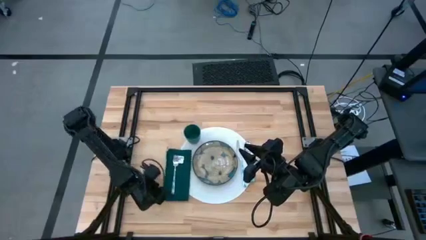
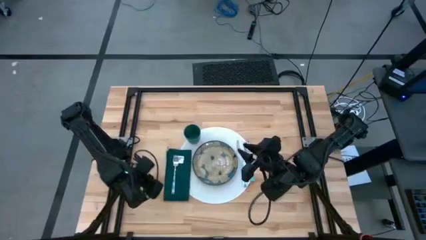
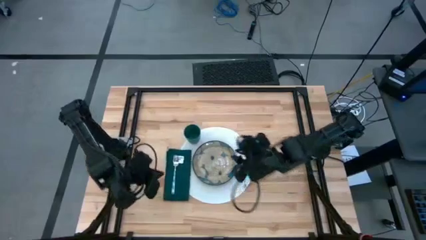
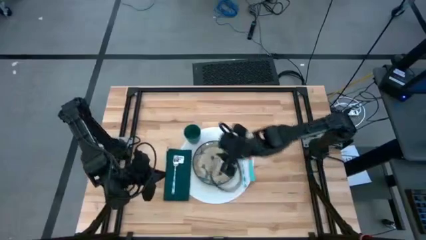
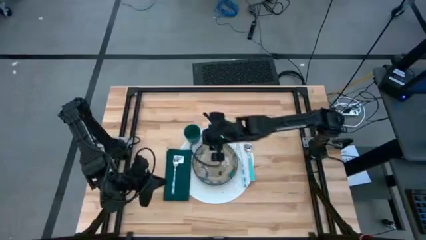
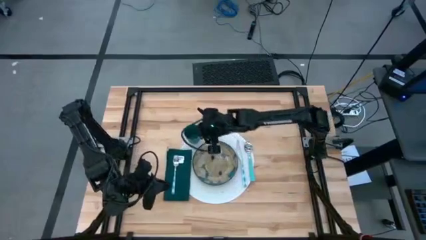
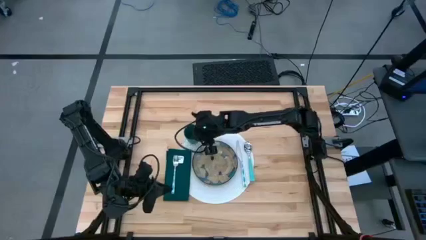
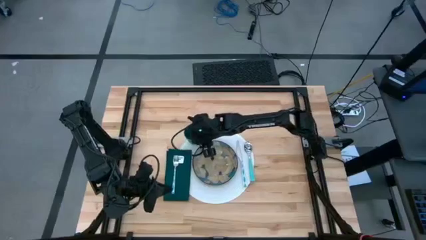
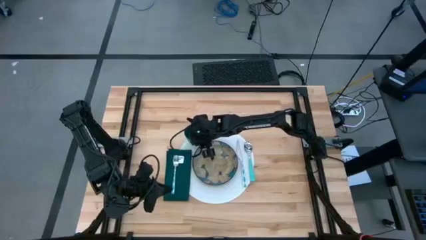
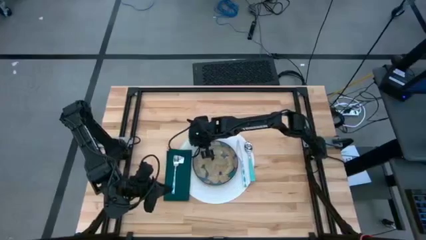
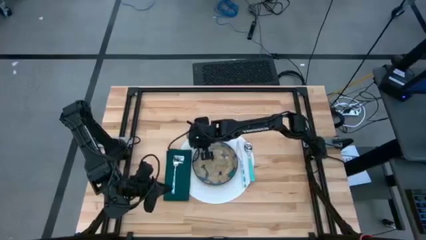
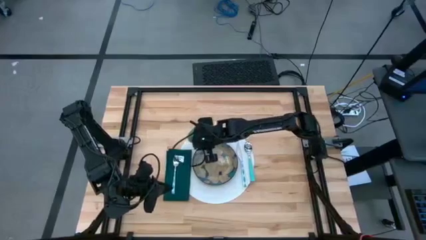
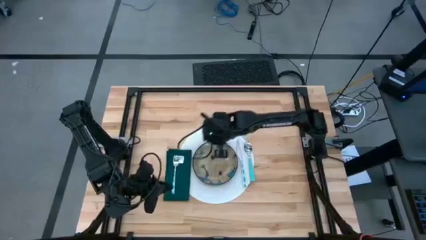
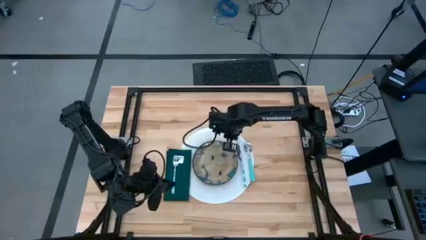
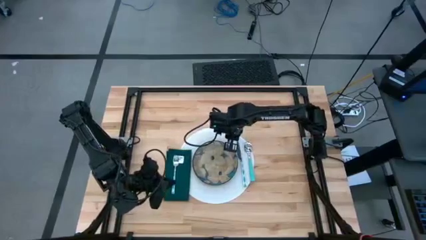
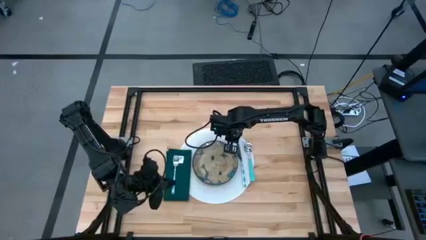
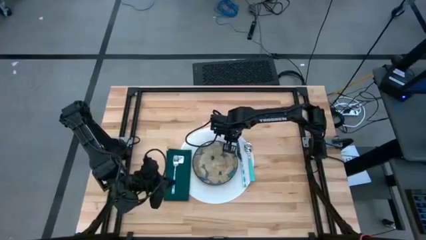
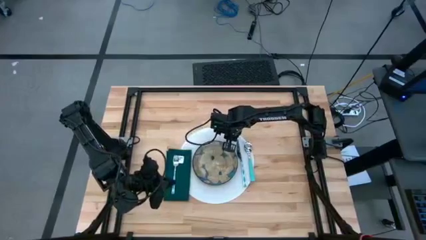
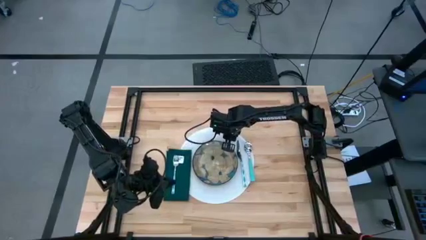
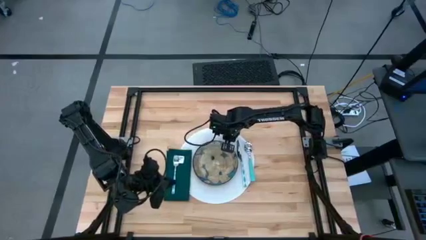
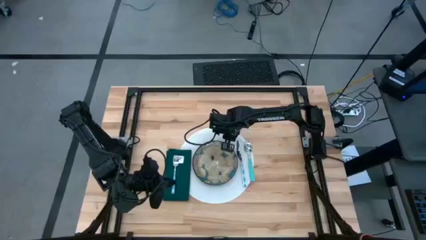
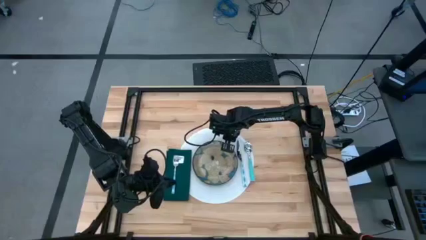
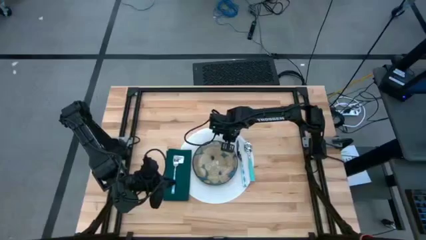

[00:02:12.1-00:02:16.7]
Task: Set table place
Move the dark green cup on the top right of the white table mat

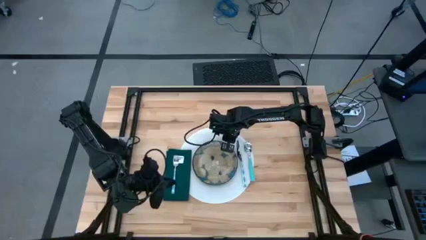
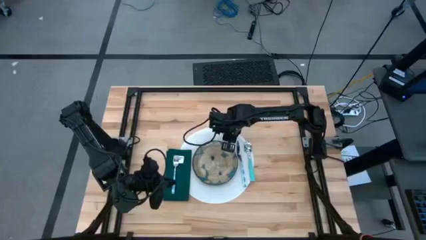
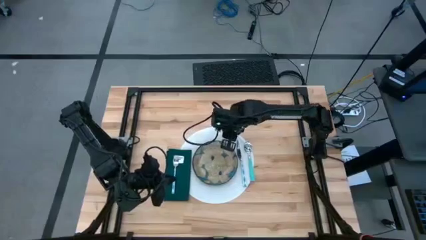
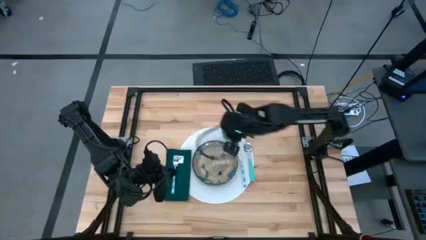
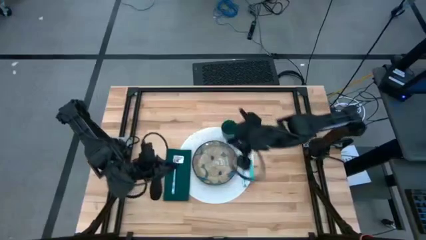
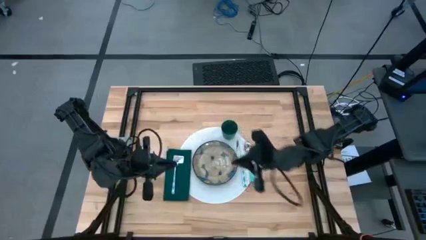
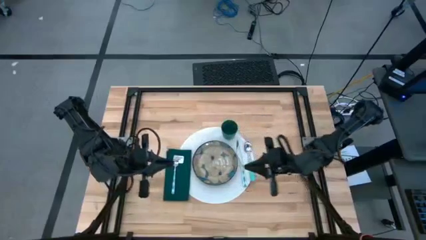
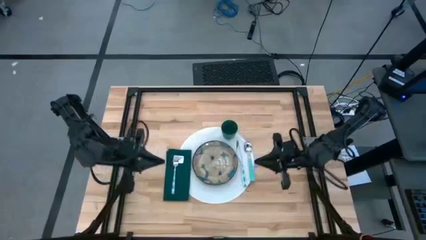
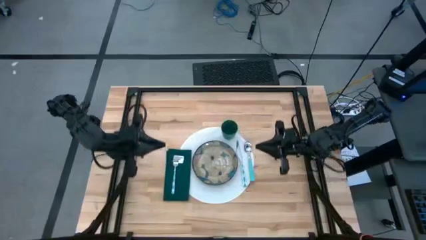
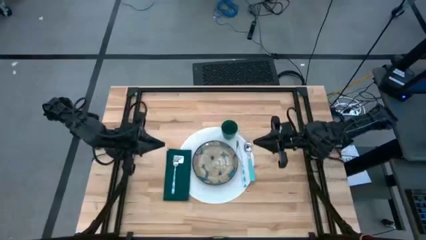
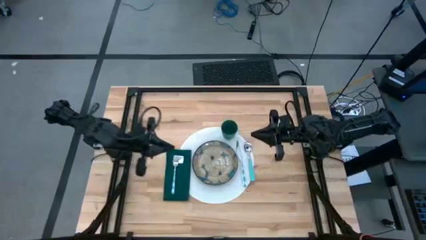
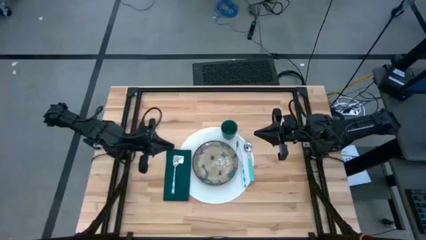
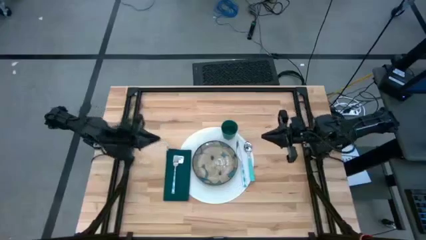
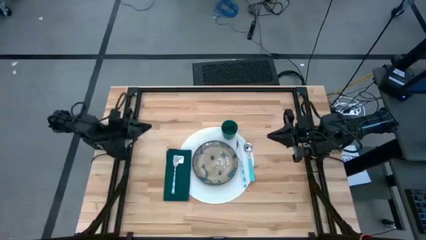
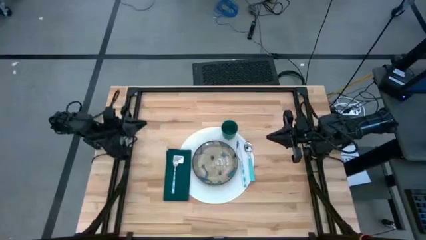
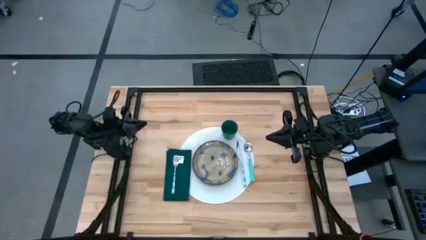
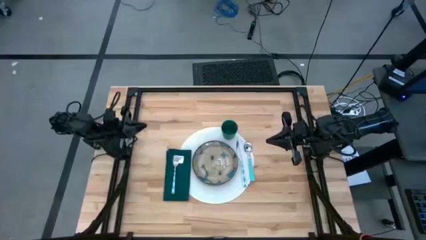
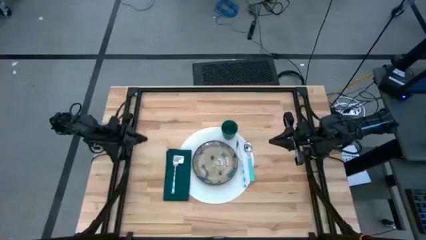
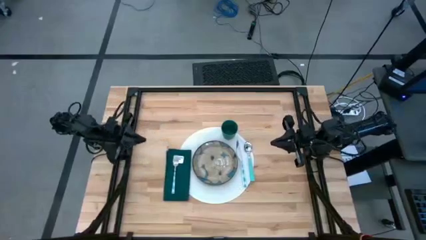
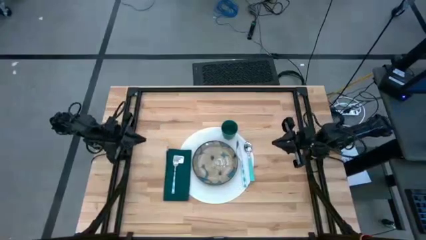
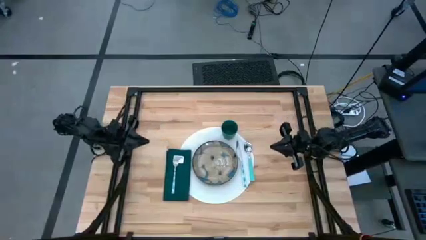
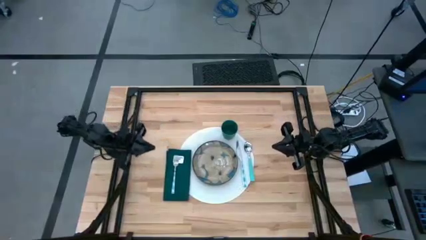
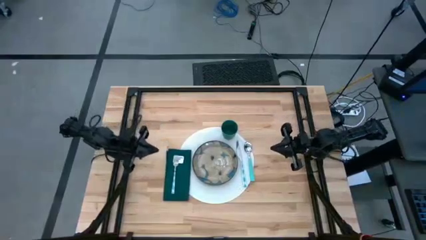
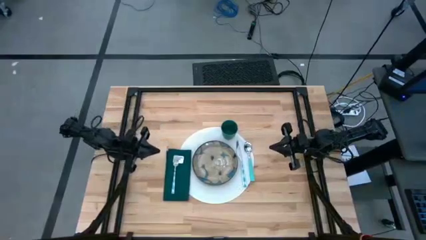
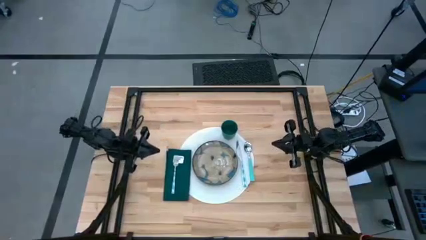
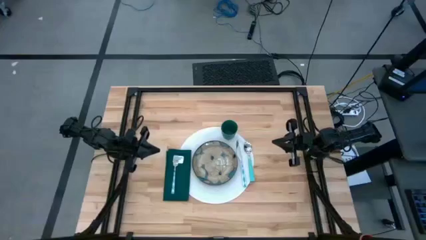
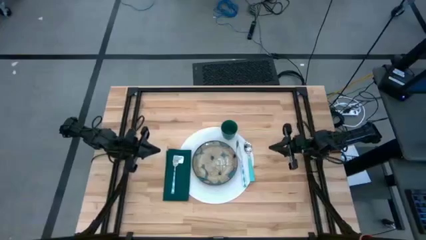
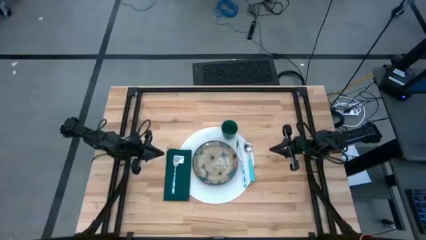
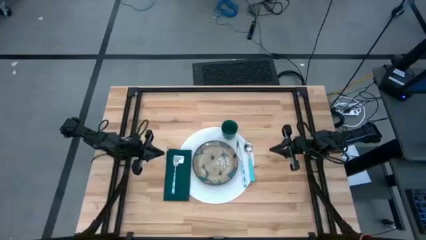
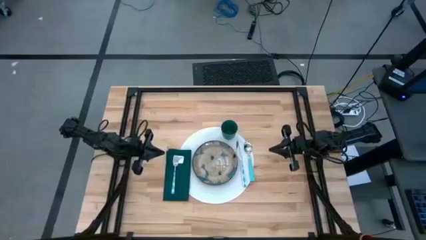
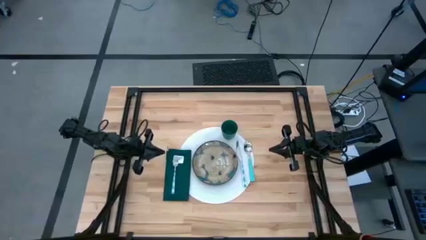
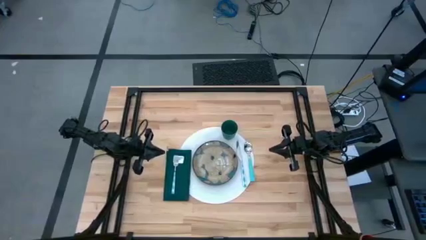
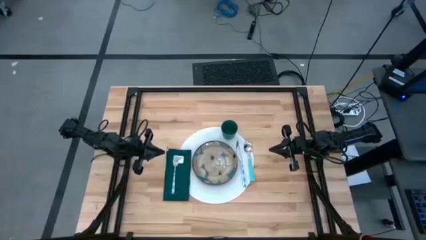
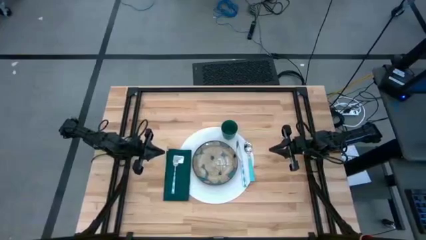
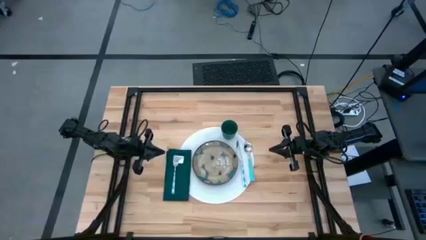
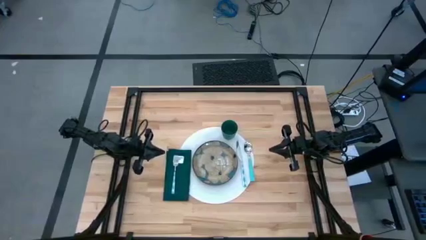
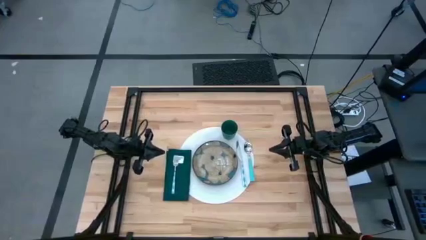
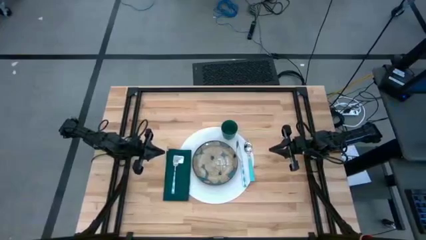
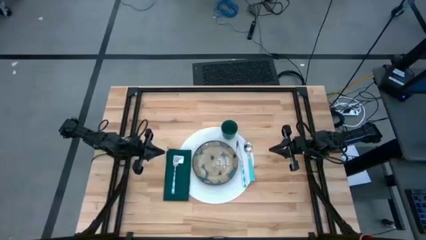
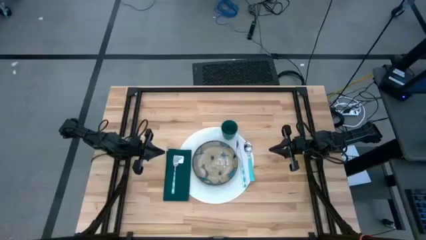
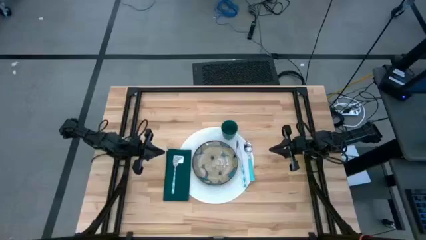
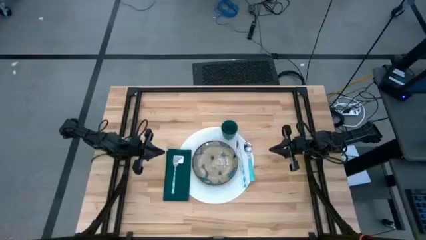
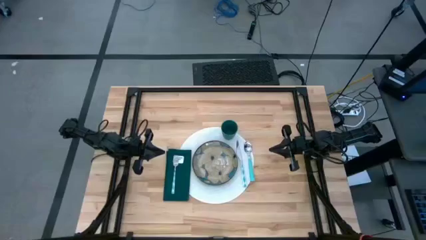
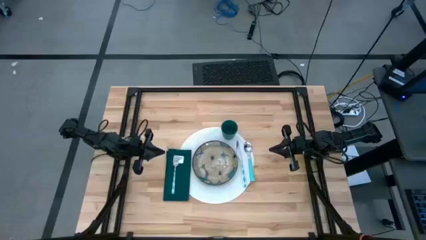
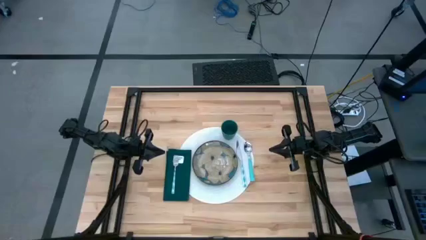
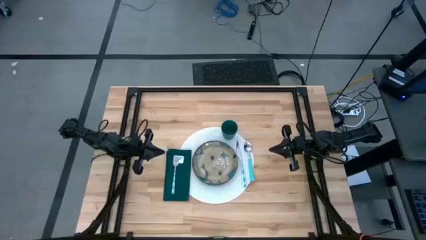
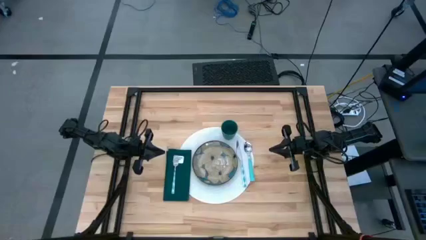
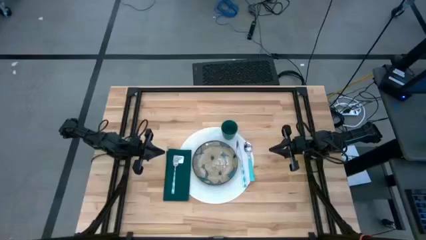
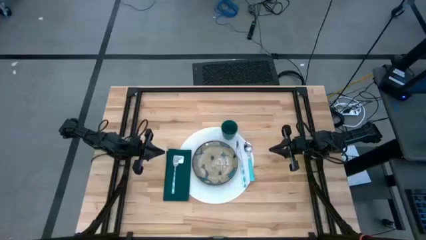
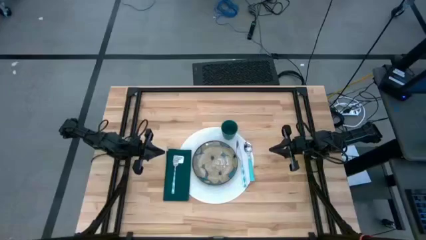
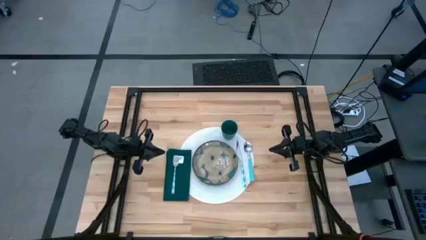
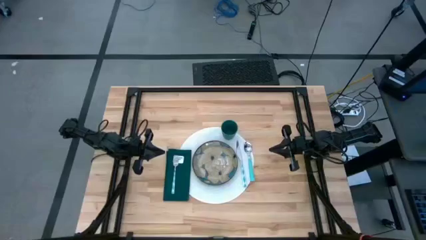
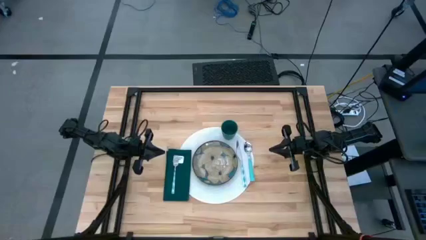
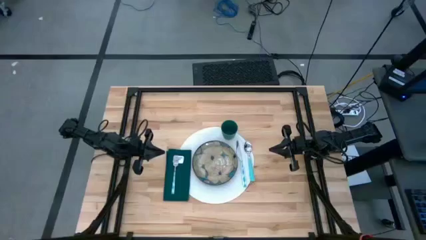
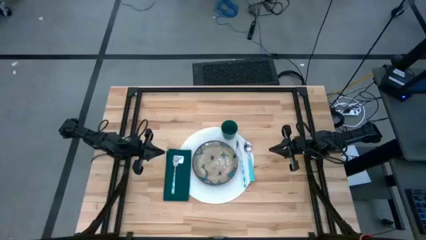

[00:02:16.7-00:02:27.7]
Return to Home Position
